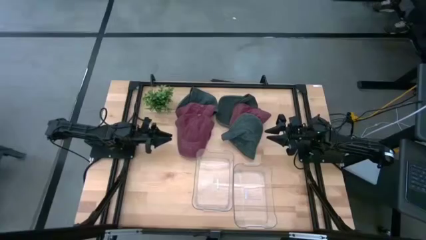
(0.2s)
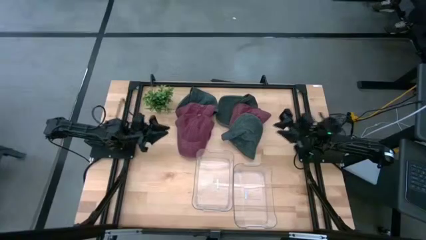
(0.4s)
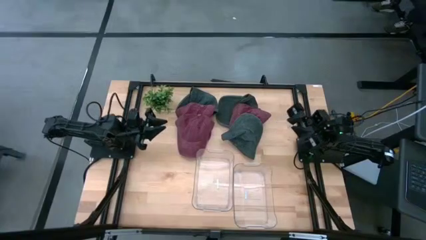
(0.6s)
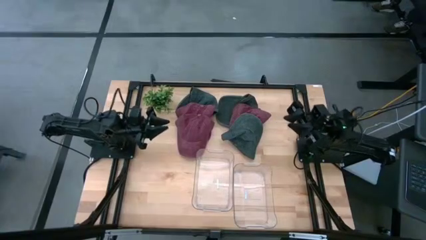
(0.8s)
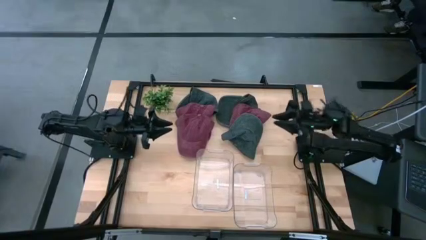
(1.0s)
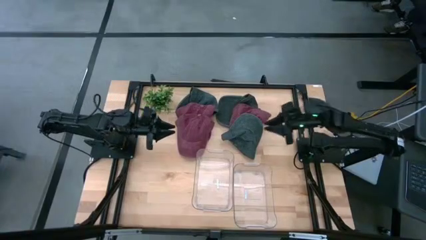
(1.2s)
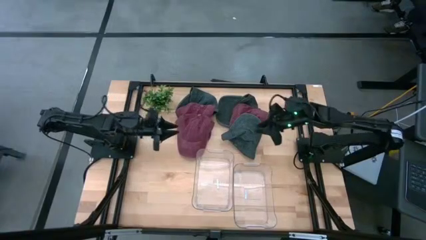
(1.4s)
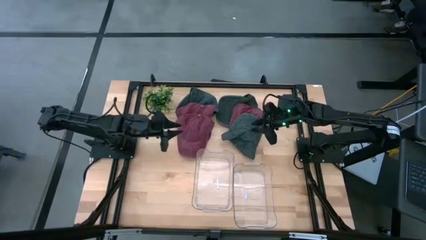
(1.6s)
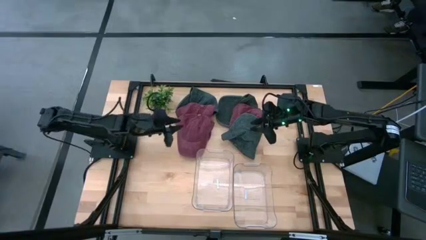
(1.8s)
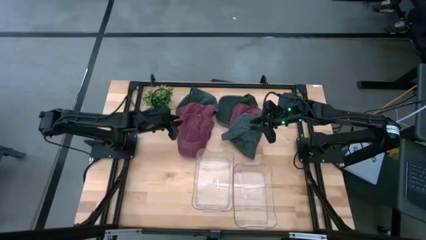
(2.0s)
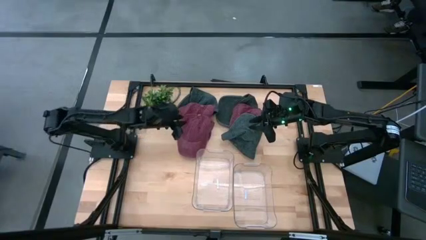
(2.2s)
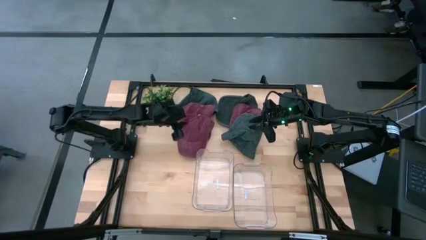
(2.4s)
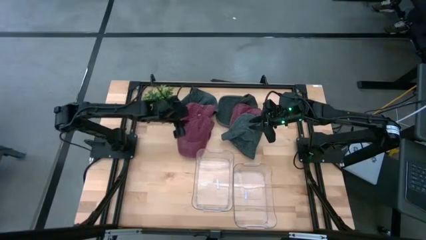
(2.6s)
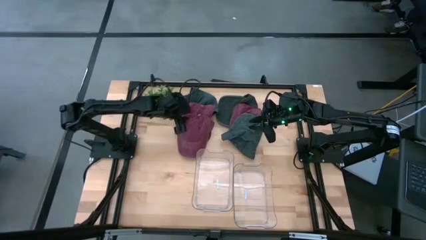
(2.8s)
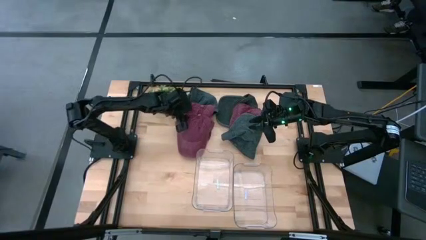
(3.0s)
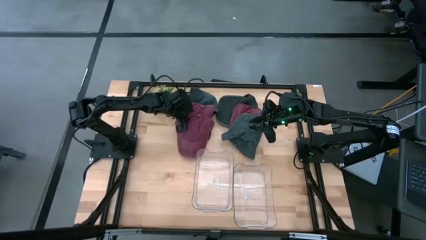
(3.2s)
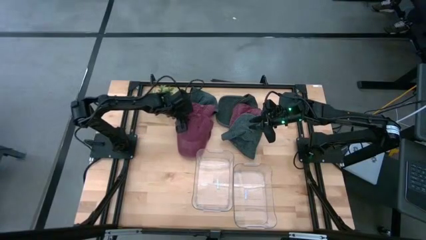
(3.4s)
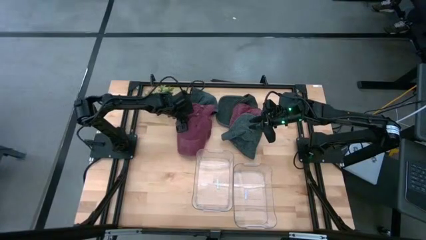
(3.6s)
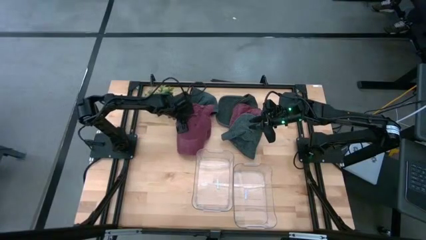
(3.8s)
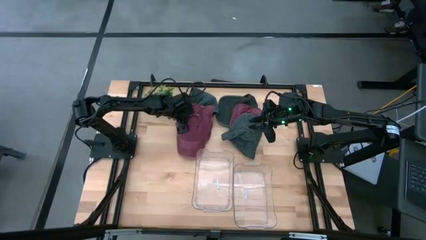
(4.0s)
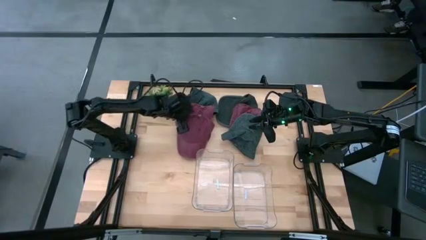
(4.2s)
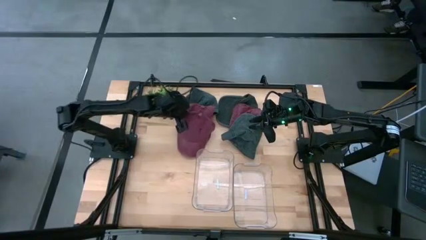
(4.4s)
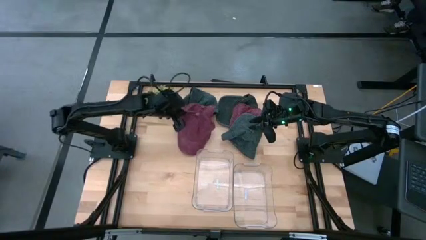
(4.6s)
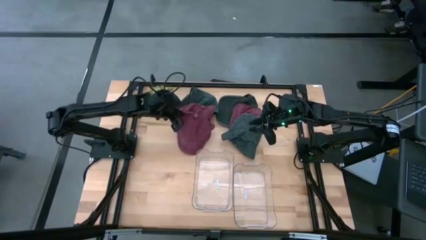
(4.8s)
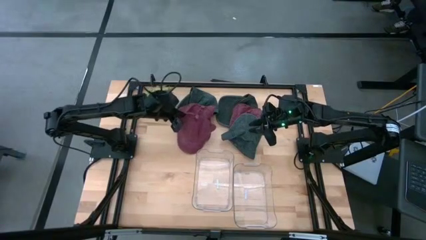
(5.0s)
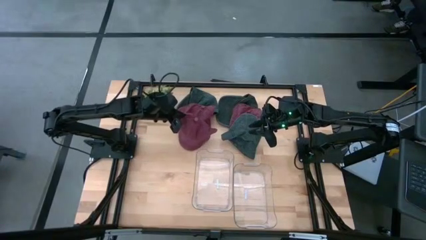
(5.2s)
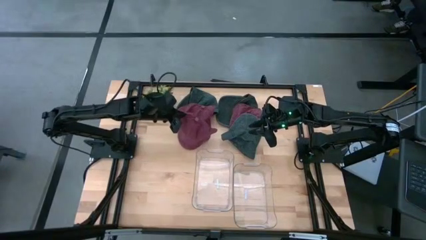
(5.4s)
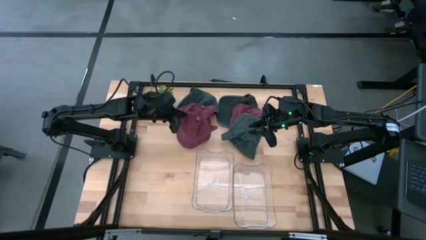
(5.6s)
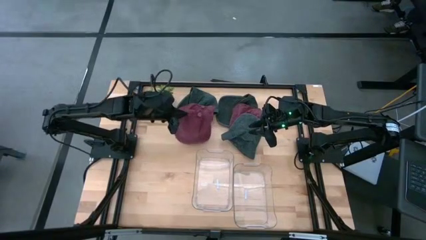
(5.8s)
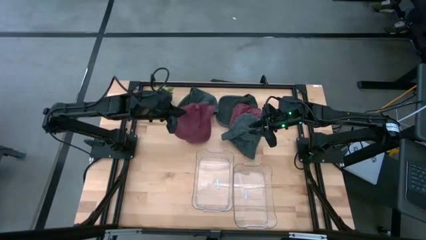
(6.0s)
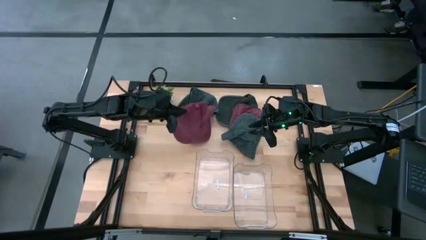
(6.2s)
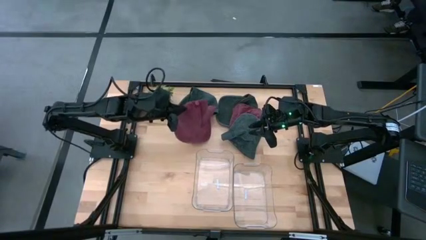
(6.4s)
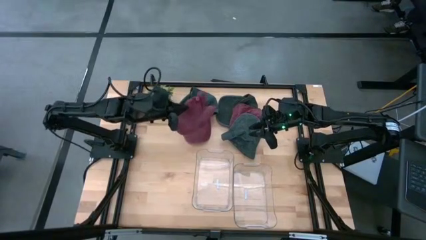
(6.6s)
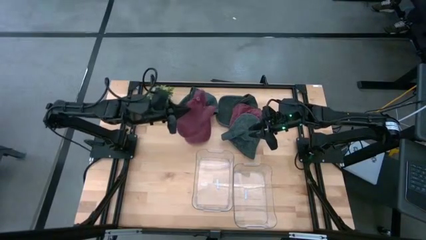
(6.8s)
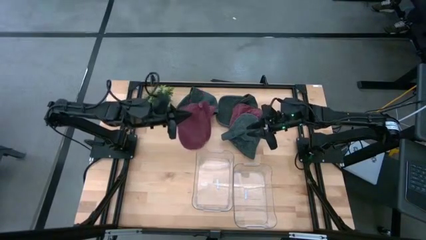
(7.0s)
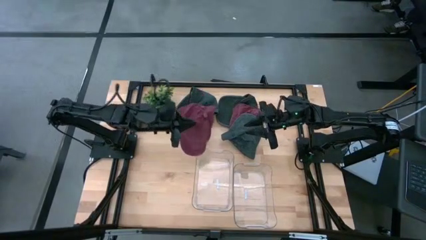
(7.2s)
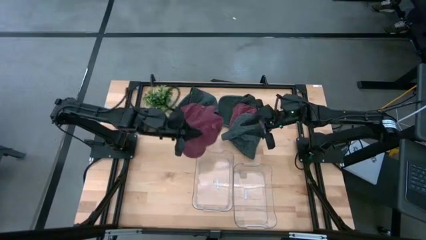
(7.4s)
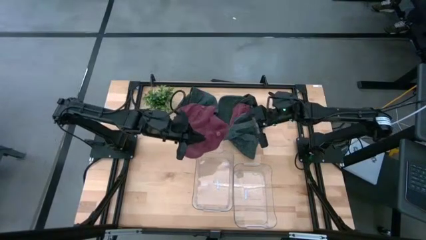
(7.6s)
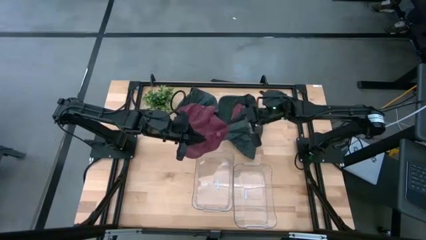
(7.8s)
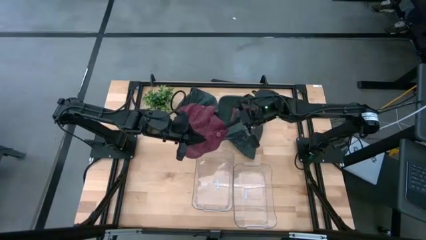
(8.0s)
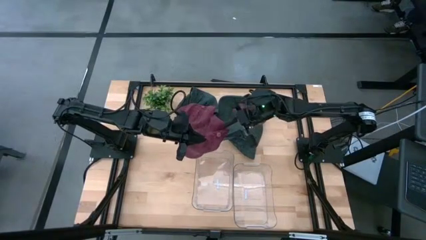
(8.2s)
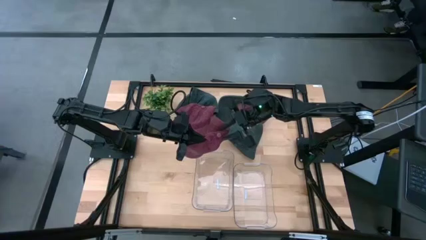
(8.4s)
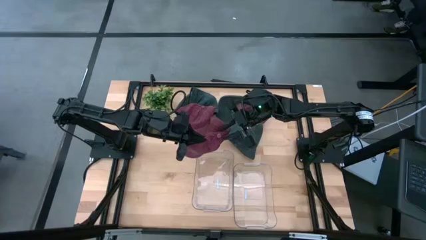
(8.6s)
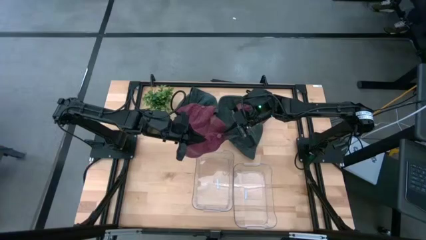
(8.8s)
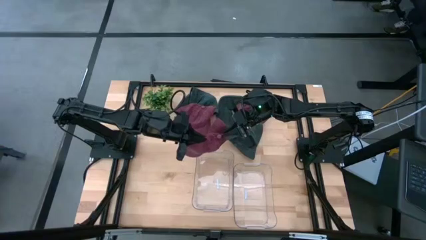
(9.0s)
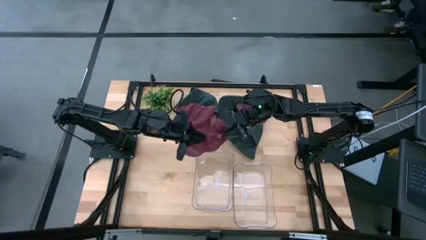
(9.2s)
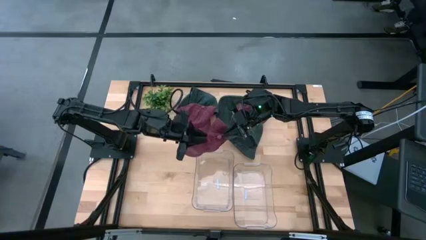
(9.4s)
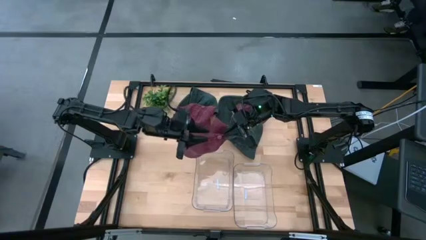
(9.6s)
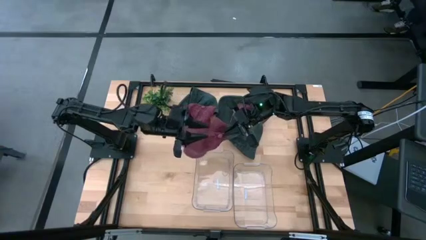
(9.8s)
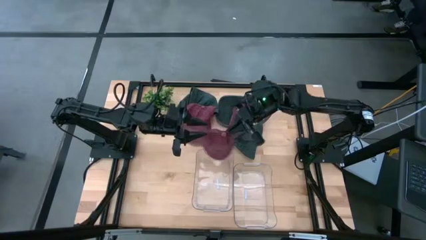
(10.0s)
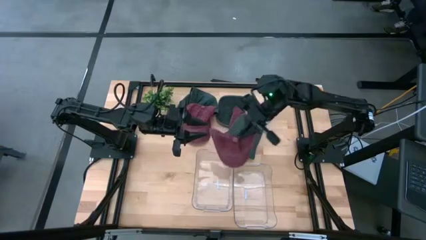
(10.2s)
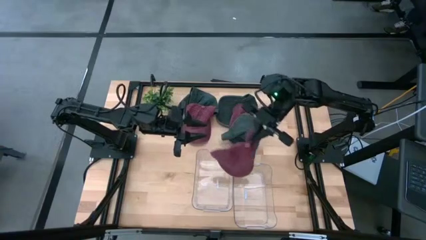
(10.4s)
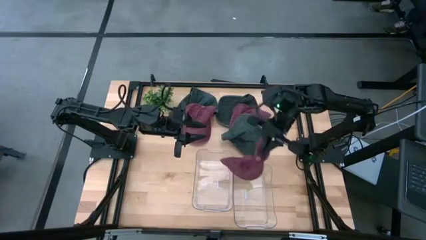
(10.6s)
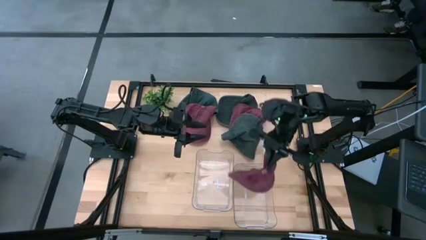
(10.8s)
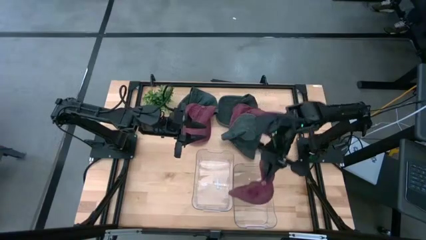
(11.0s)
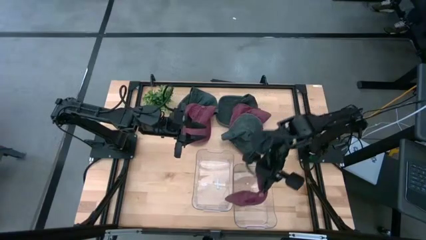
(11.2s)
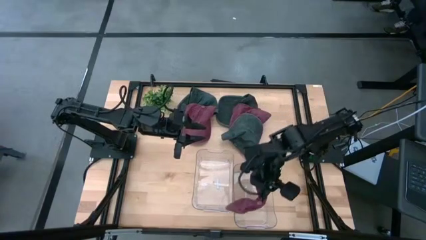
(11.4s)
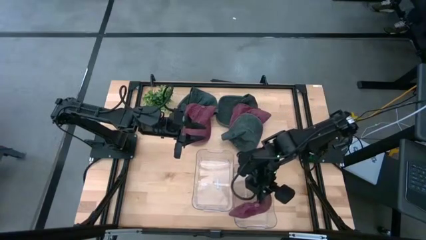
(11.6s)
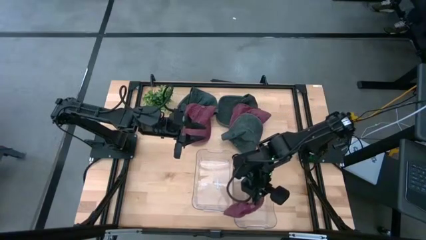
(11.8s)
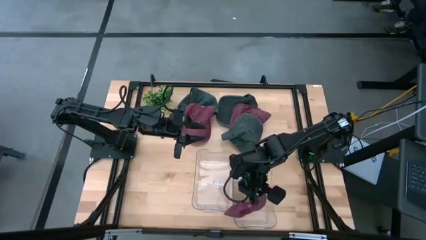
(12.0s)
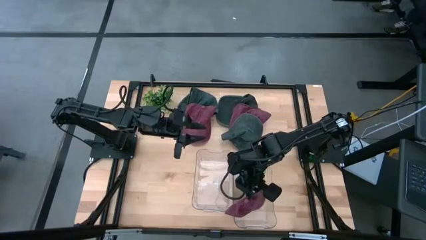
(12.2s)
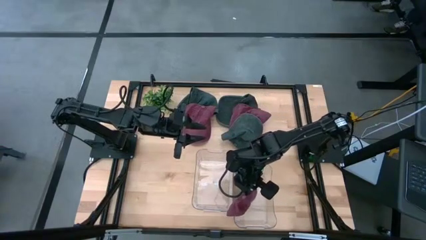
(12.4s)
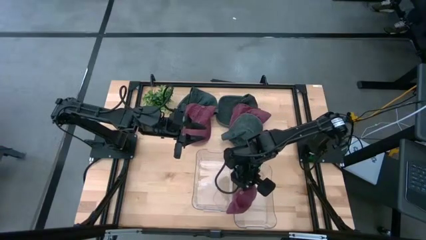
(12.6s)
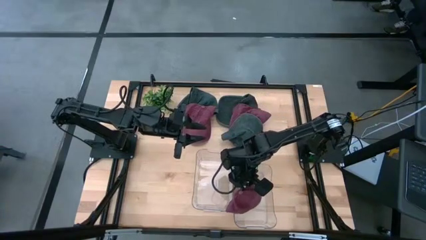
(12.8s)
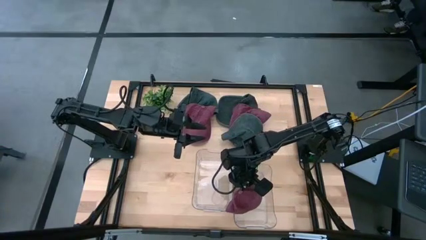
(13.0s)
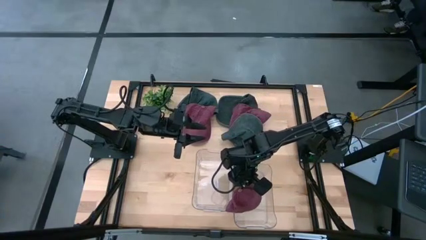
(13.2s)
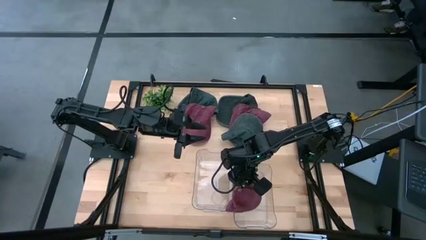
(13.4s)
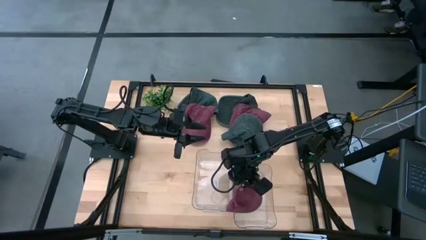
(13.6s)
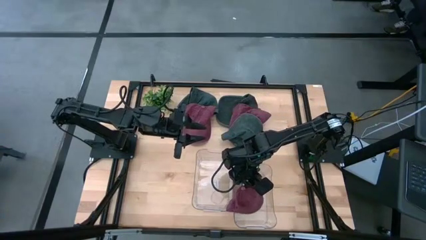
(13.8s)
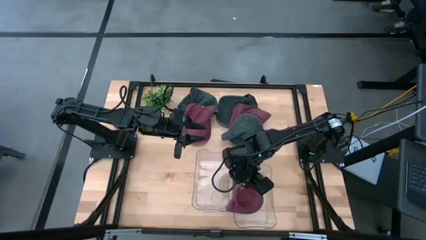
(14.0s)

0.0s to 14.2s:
Task: Pick & Place hat
Put the bottom left red cap into the right transparent bin
